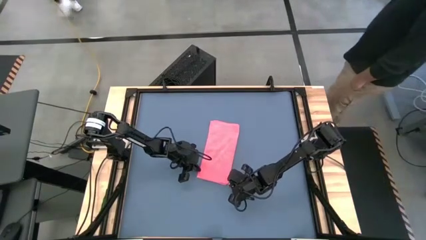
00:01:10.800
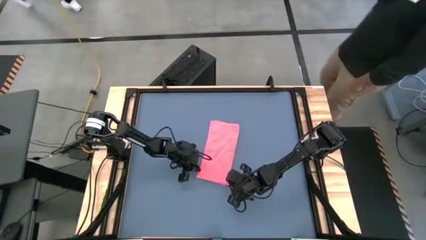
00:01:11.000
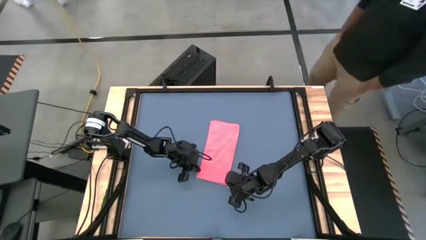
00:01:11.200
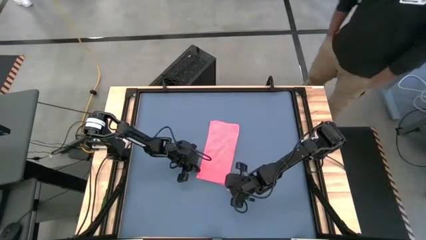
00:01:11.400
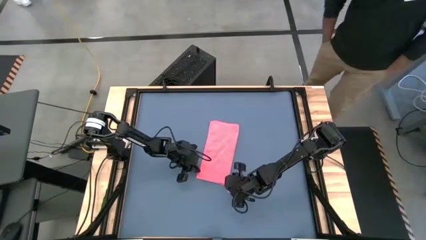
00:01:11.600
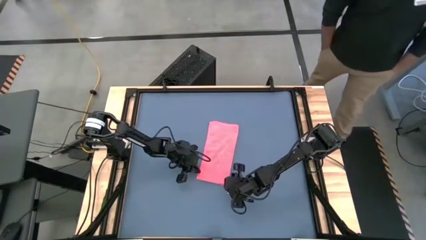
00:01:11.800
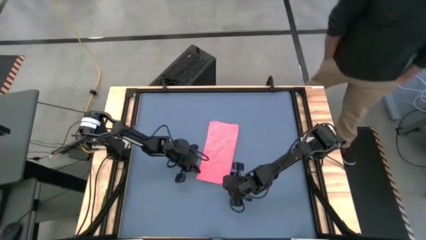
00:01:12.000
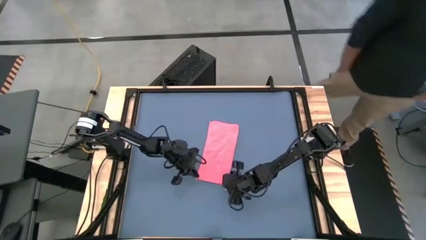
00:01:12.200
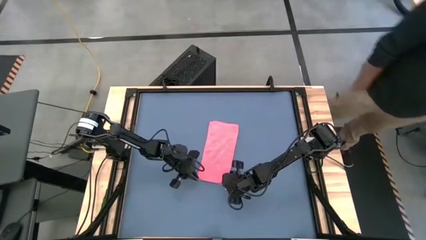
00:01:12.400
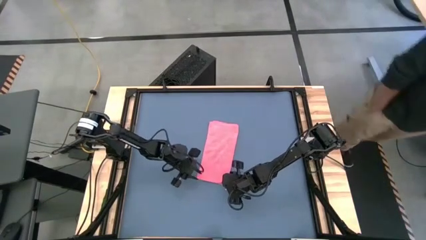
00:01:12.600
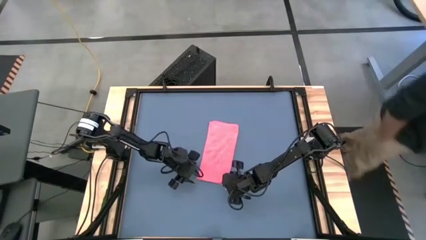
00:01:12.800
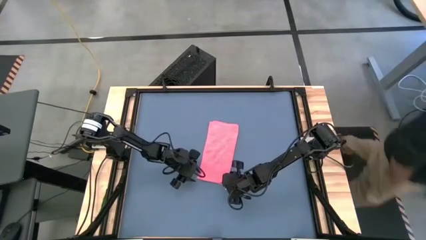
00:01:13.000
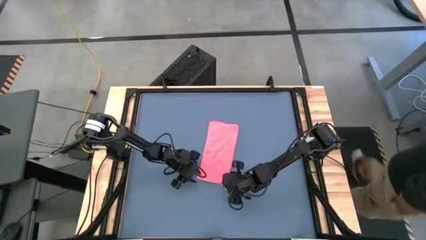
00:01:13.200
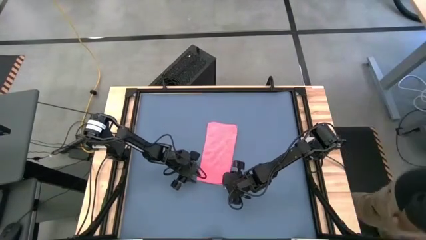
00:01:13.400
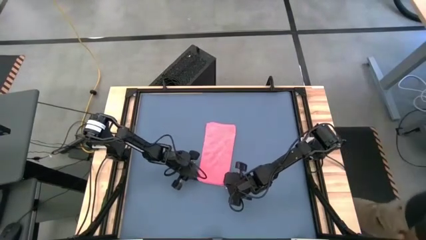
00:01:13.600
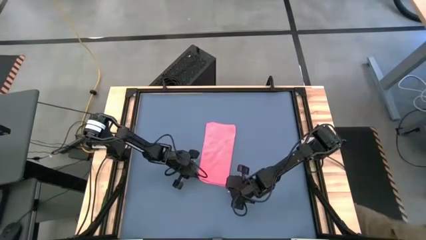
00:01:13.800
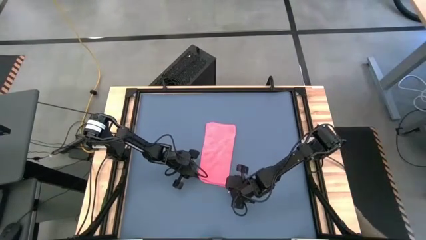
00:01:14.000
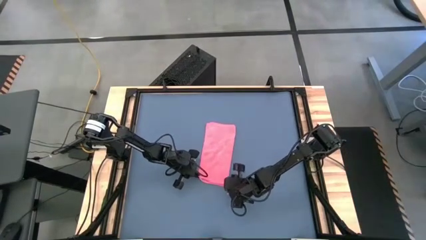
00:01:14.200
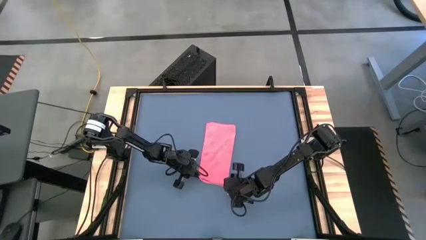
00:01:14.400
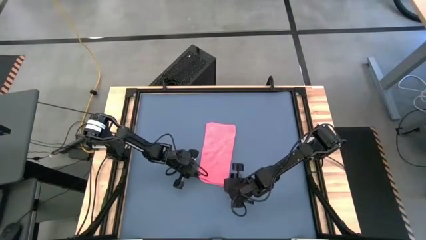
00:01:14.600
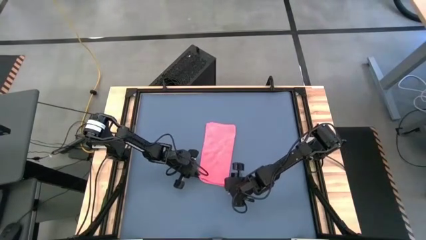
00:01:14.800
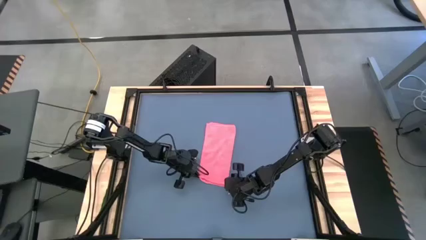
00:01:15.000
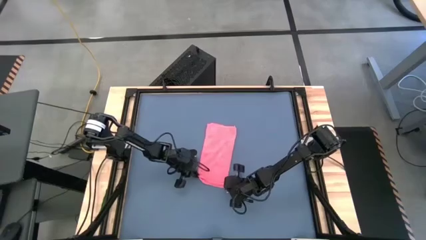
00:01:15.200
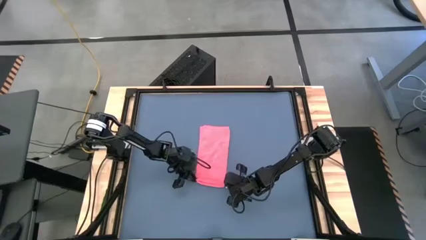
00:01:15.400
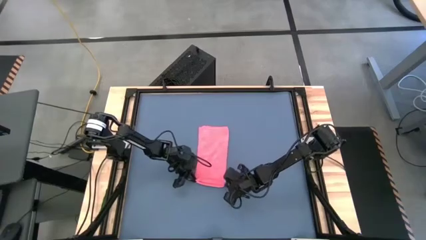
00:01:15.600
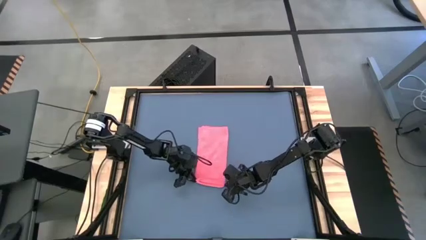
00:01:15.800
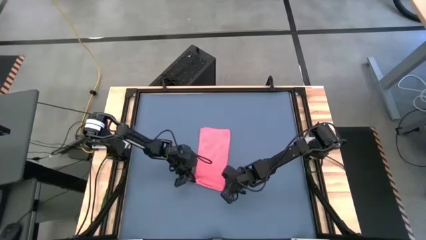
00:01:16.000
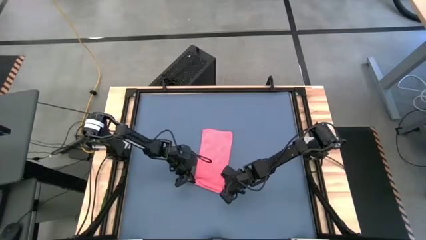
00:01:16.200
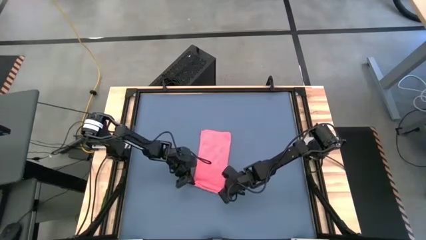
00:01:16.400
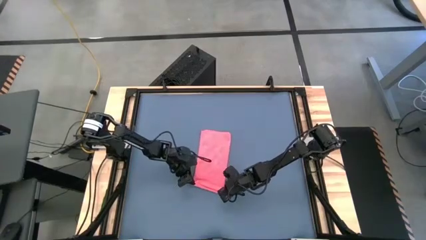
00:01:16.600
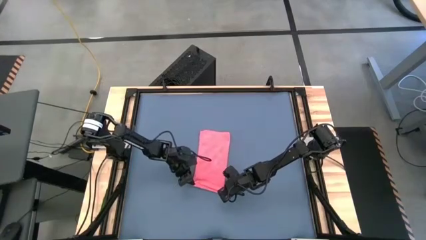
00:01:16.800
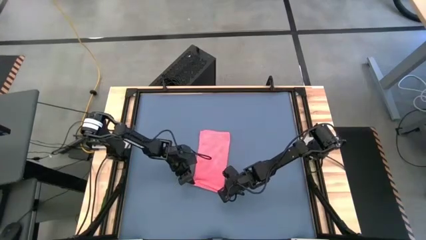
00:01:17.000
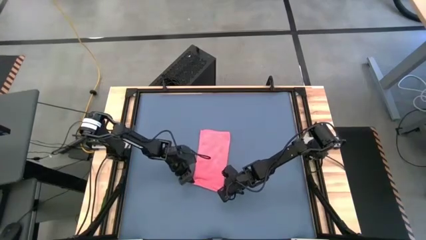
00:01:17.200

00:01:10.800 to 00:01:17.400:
Task: Roll towel
Roll the pink towel

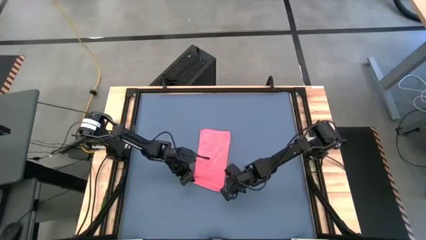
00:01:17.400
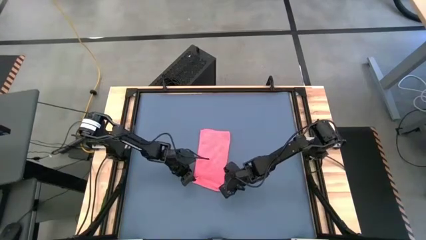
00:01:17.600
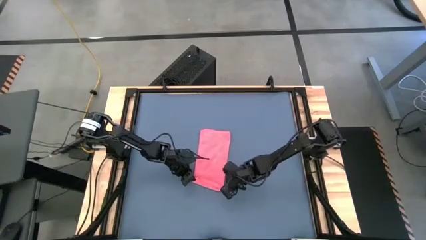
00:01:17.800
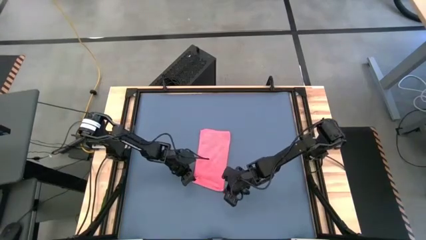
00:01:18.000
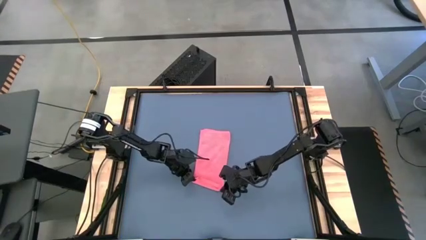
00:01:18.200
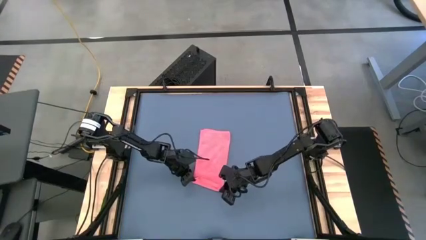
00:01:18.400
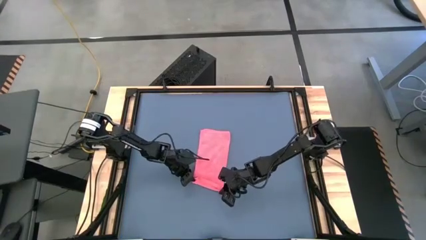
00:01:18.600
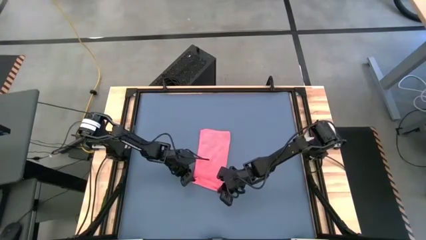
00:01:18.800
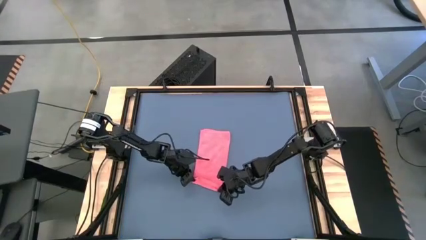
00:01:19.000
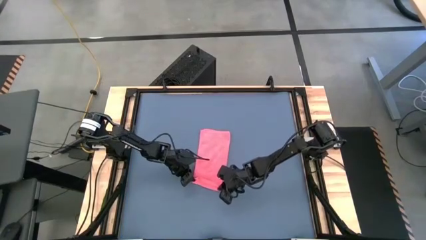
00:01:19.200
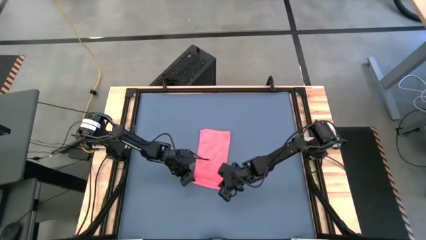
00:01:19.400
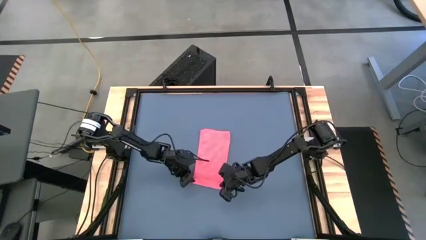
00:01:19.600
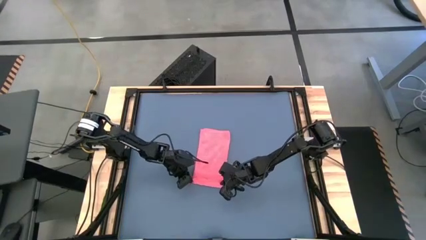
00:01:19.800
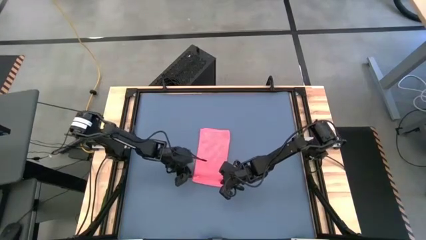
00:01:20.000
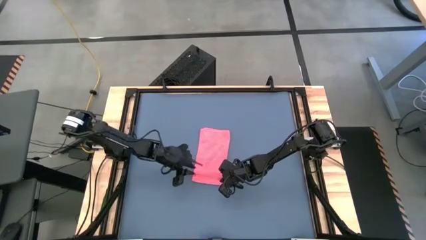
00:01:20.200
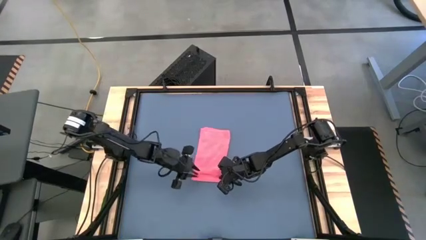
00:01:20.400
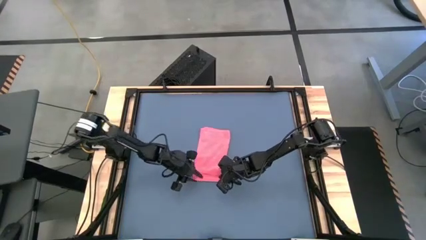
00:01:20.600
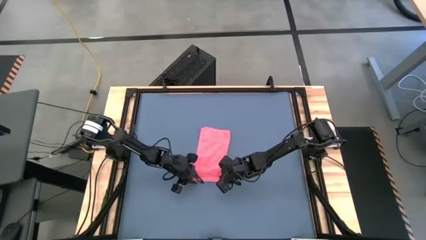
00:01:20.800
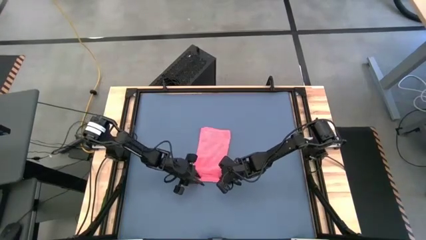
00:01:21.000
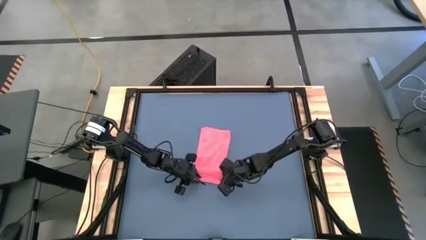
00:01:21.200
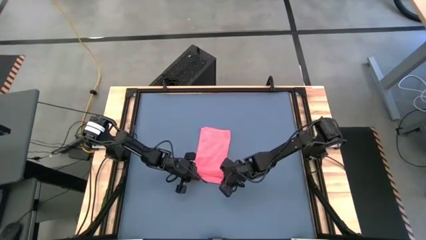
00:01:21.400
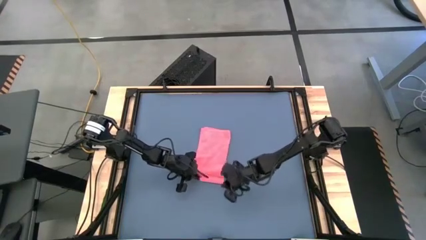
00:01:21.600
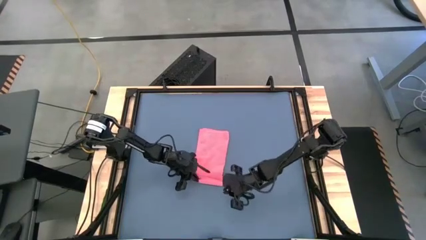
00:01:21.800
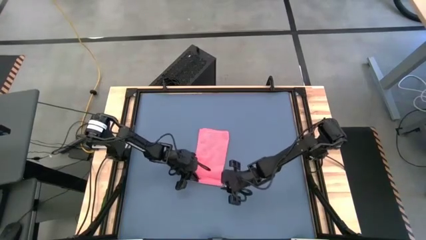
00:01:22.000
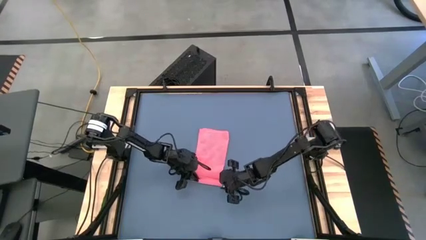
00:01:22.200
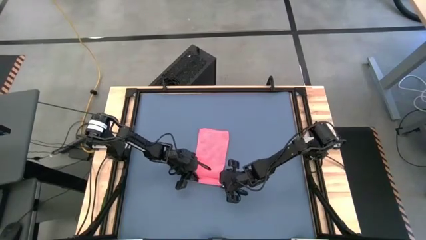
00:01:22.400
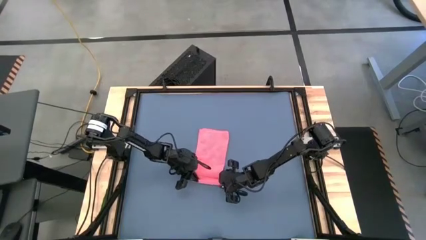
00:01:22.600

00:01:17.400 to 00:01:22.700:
Roll the pink towel

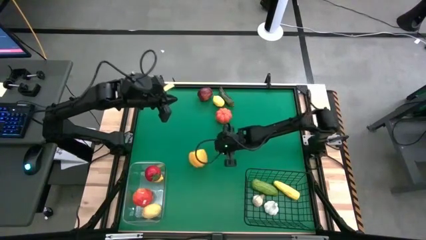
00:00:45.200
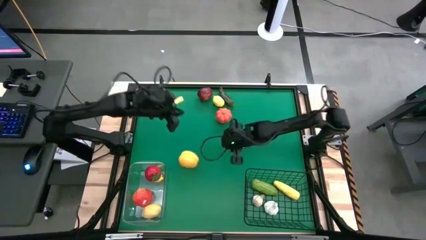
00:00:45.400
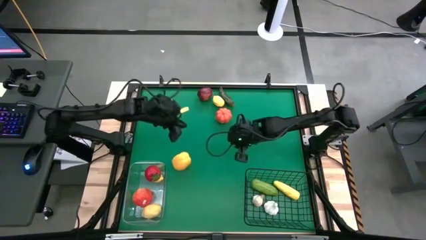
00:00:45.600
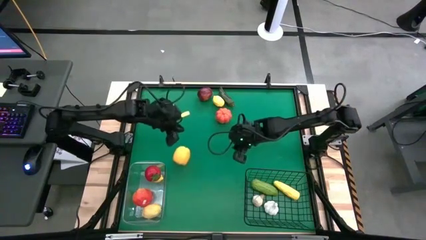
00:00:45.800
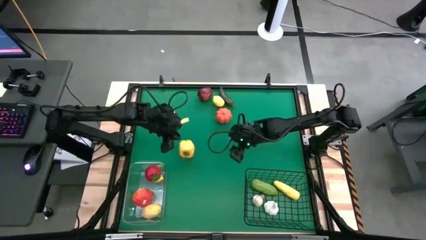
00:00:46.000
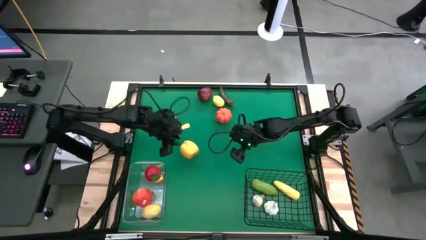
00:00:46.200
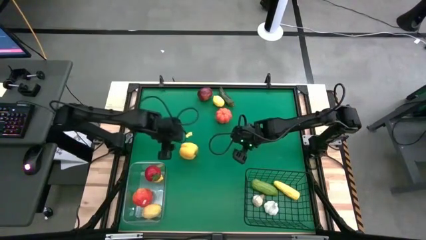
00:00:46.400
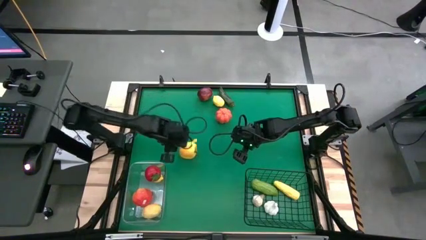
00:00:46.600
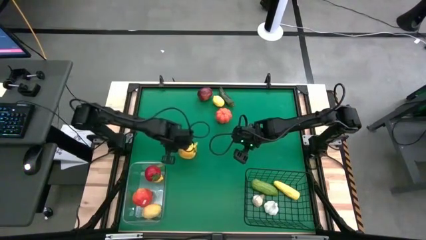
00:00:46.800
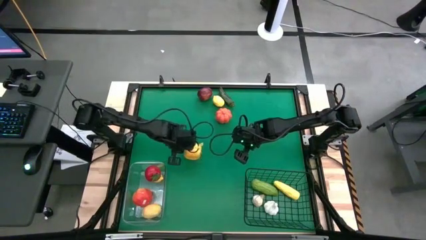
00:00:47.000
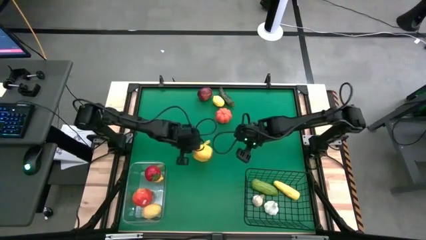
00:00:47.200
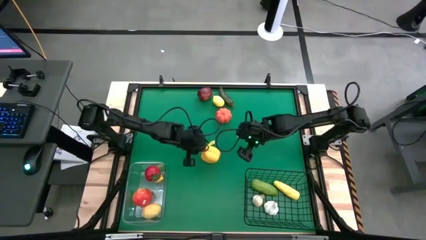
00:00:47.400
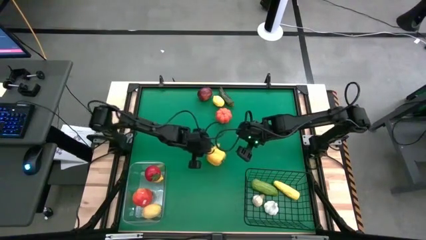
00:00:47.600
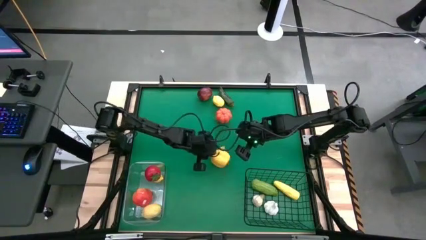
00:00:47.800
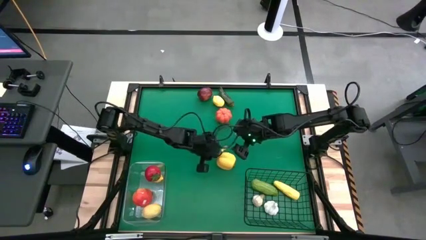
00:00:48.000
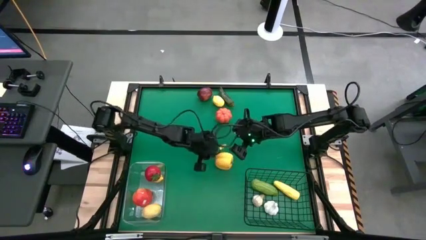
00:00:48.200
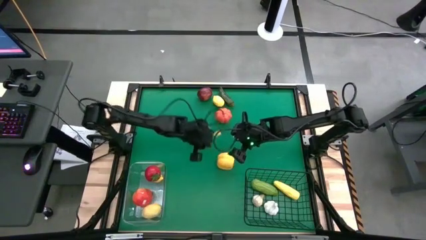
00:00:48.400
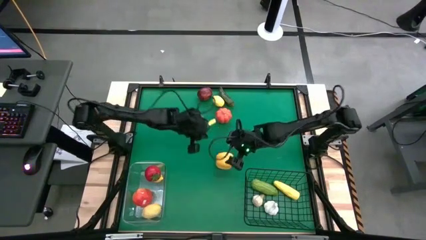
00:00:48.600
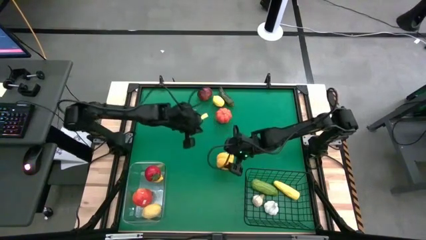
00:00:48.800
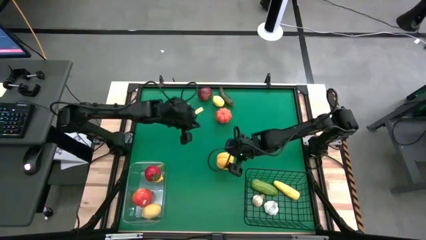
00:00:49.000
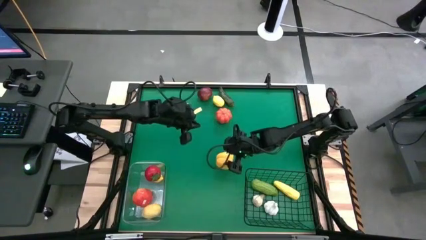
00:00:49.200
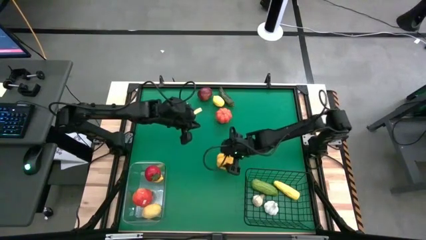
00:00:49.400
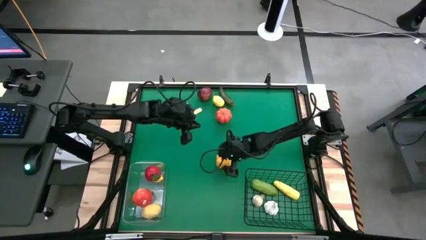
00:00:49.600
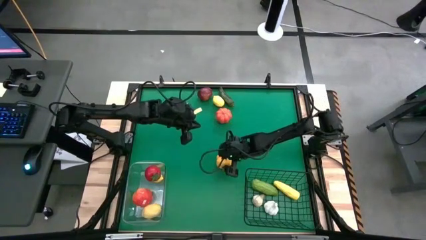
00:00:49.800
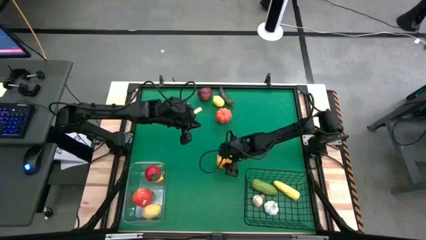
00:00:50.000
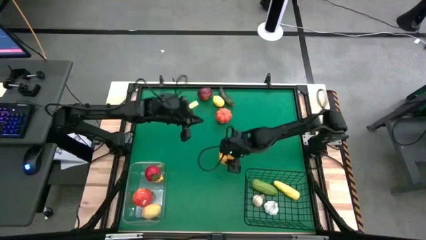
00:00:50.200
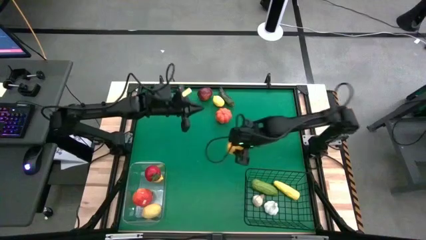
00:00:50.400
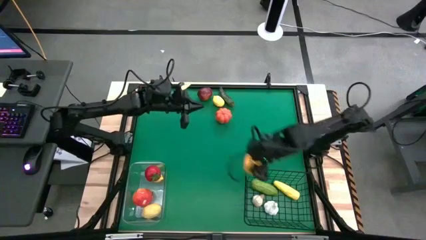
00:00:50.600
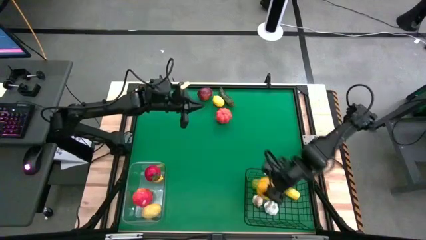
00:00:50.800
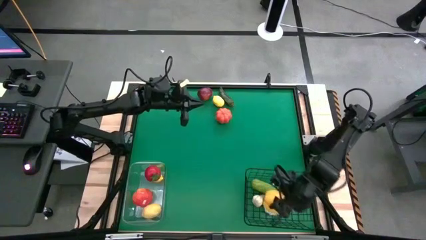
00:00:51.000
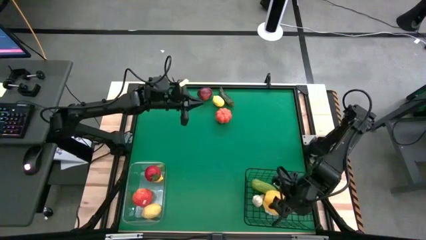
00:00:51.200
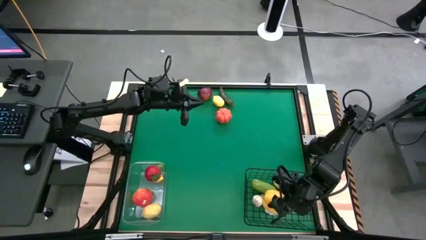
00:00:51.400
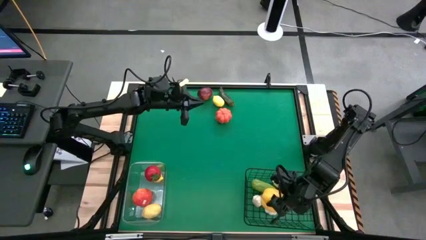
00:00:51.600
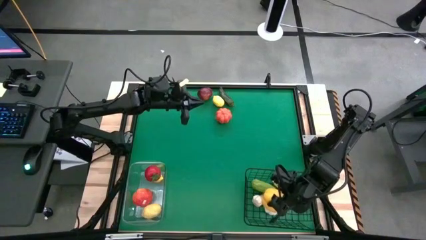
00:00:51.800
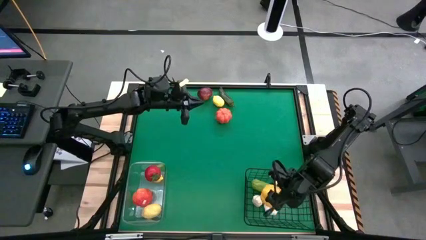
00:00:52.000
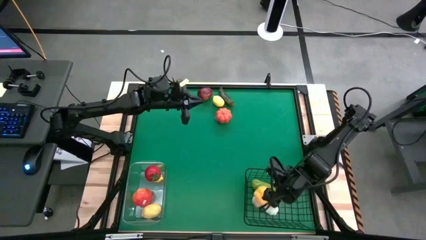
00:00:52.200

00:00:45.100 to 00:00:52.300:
Task: Sort produce into baskets
Put the yellow bell pepper into the wire basket
